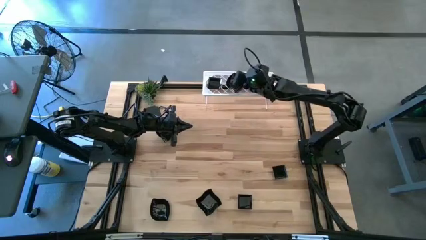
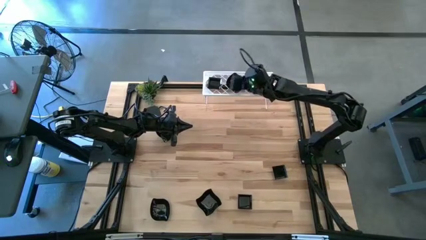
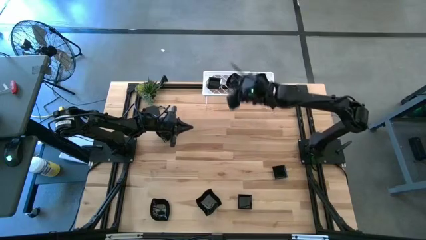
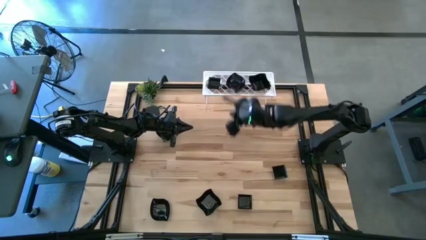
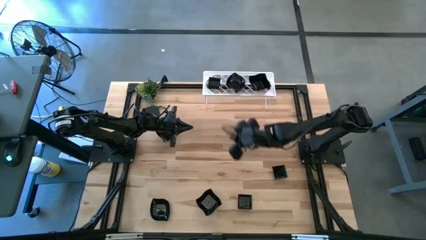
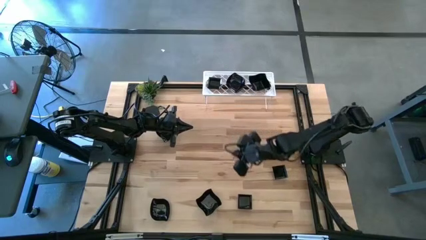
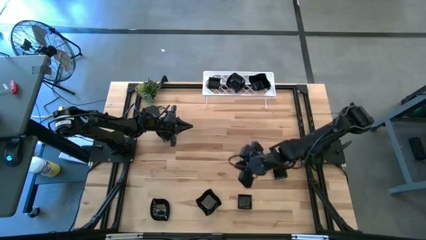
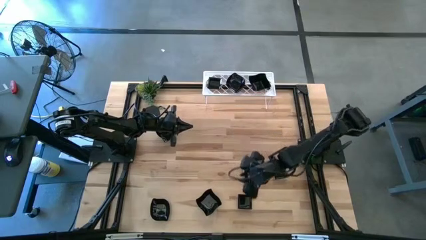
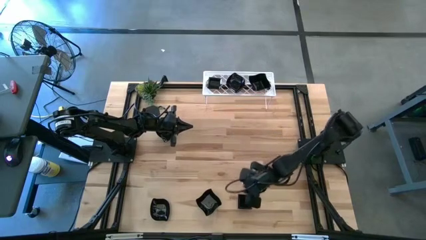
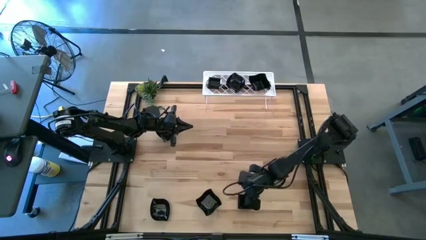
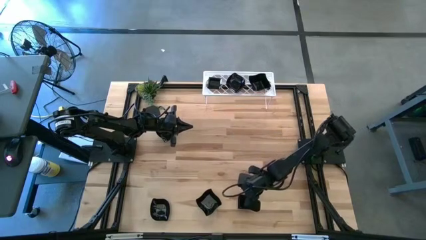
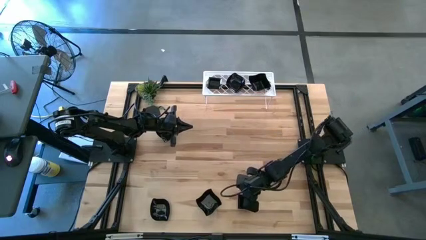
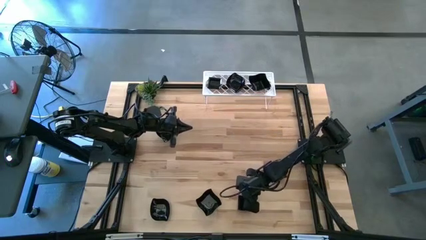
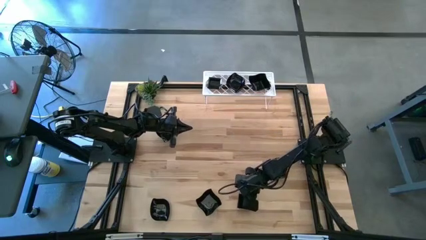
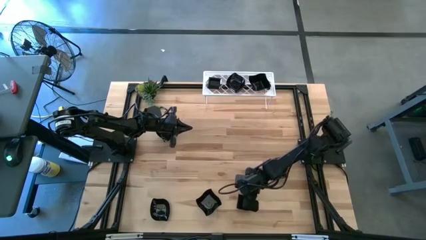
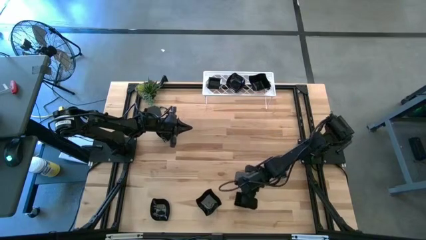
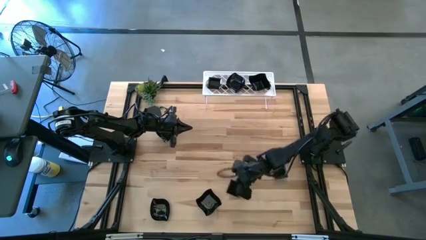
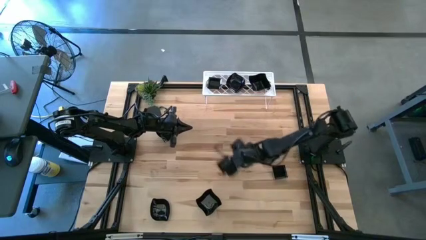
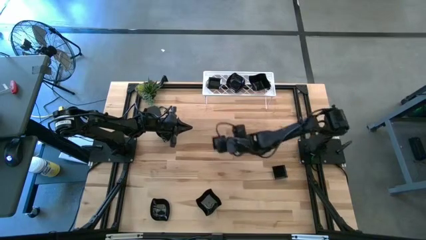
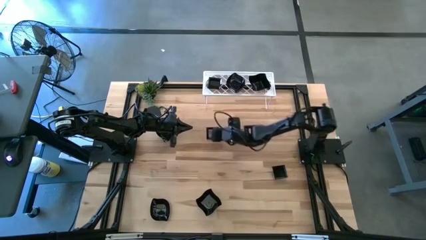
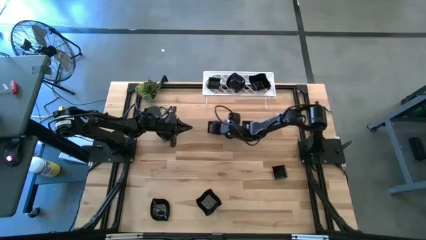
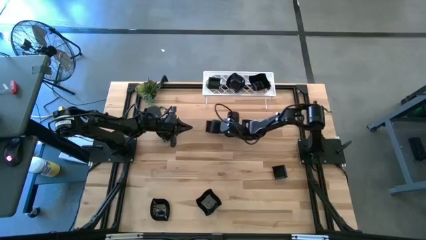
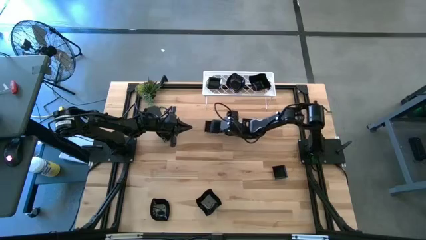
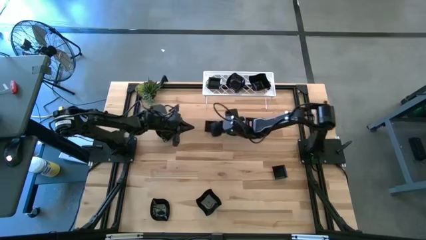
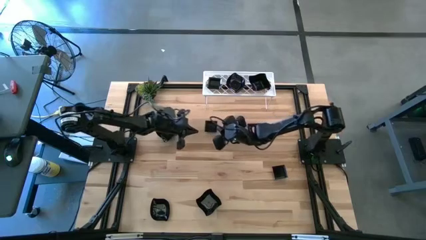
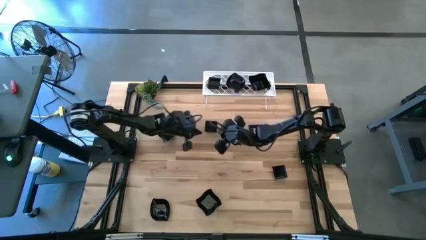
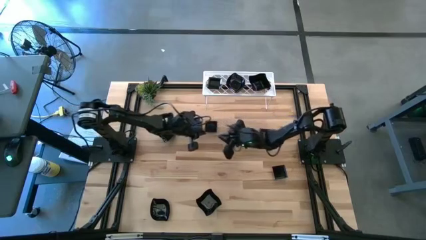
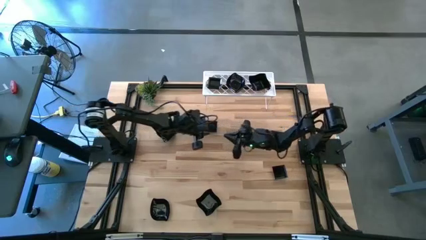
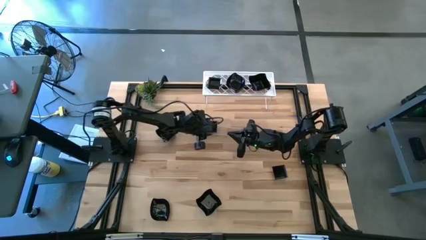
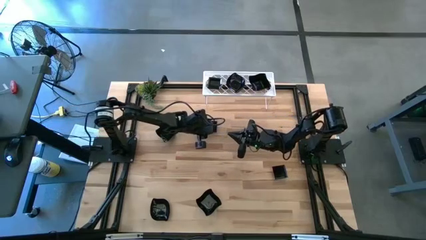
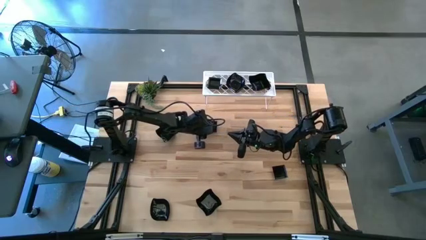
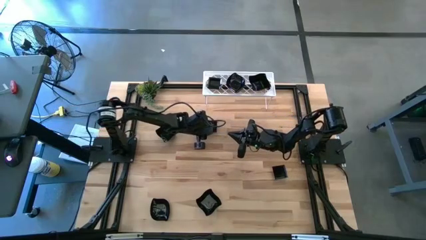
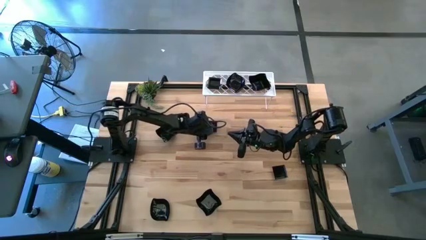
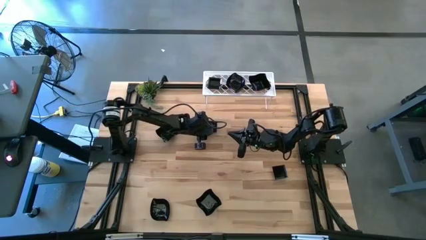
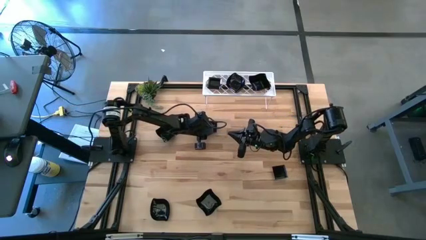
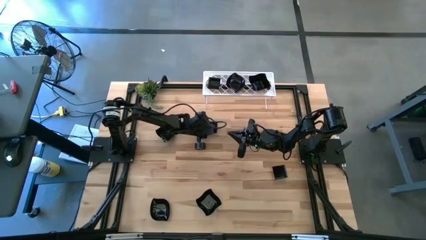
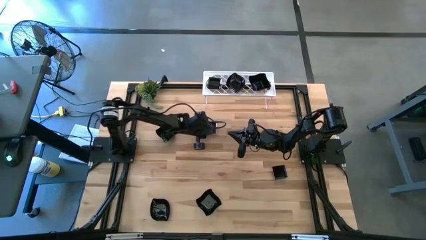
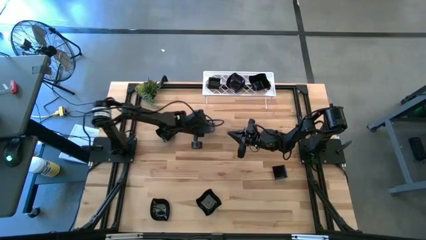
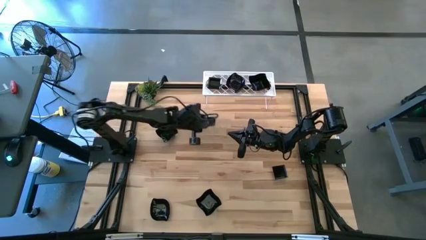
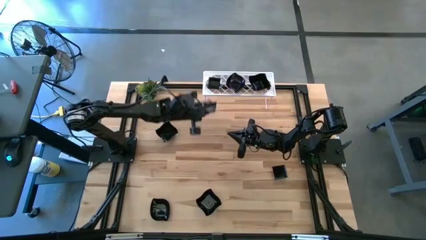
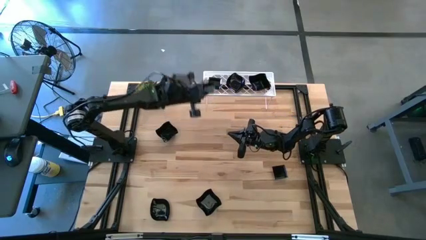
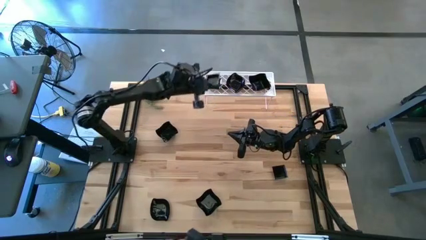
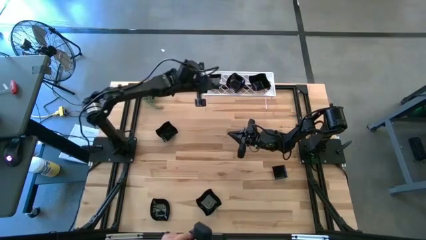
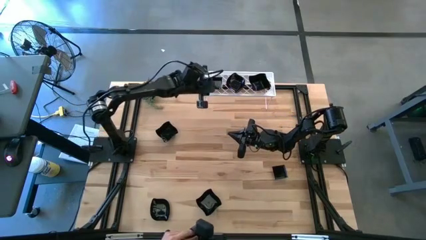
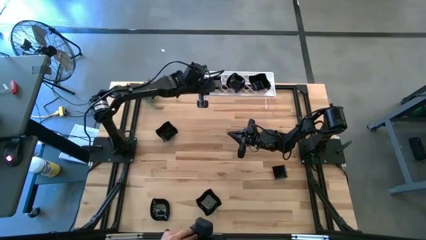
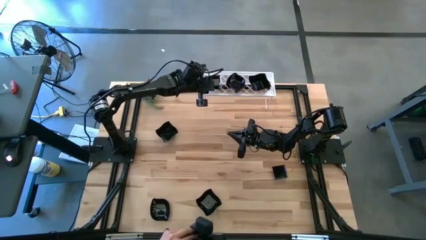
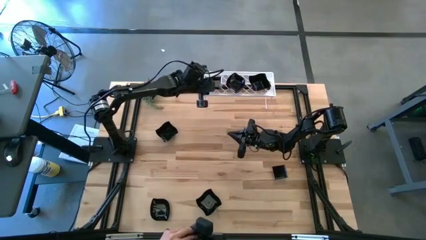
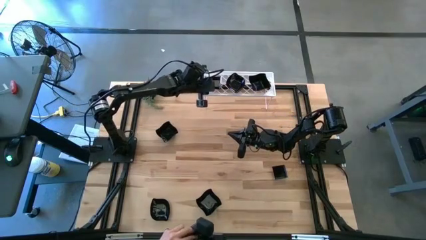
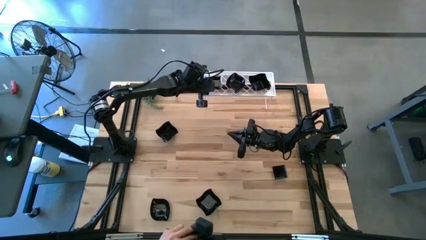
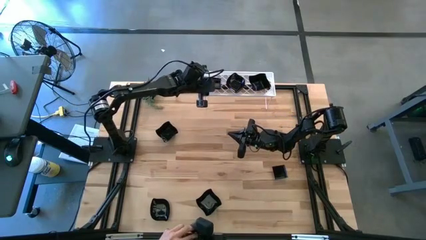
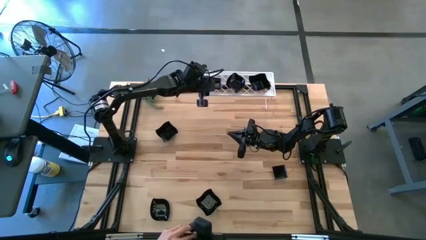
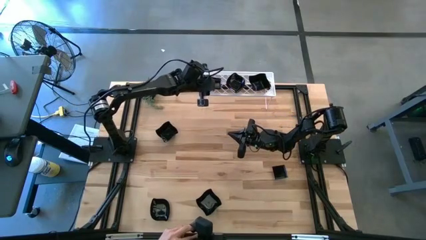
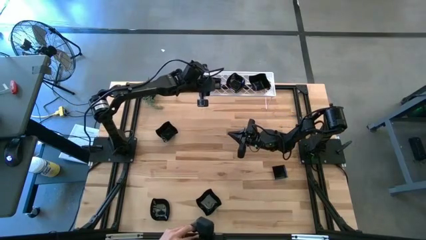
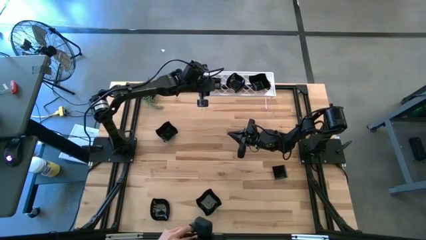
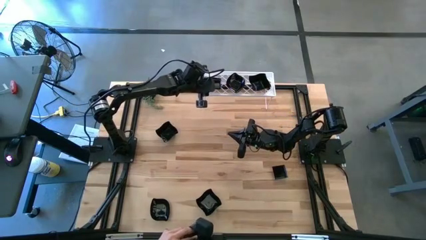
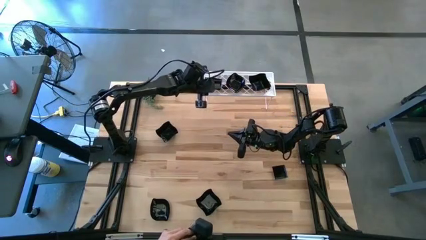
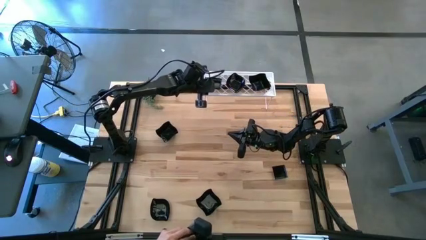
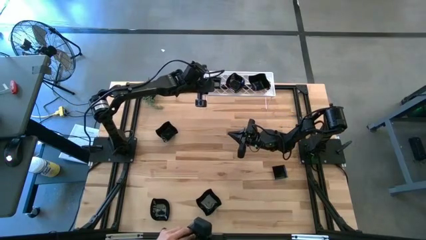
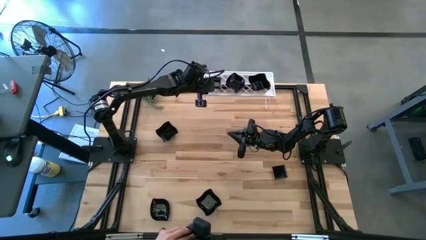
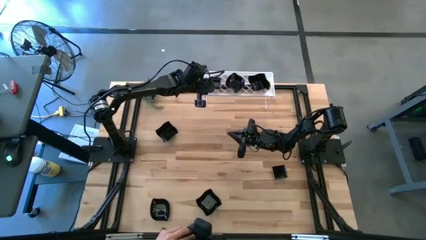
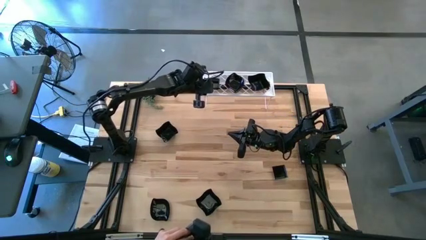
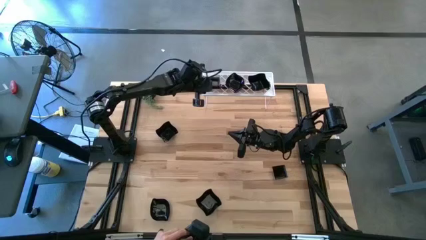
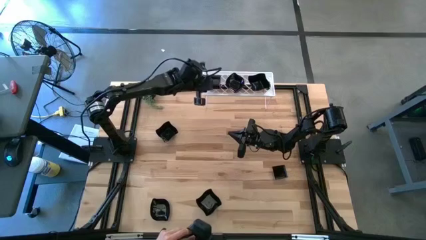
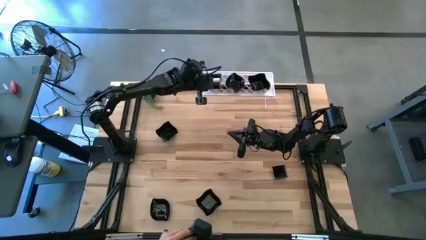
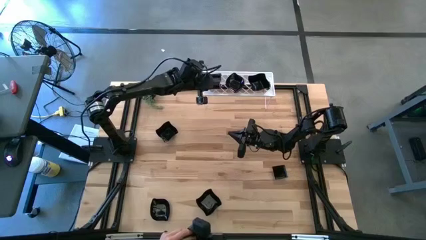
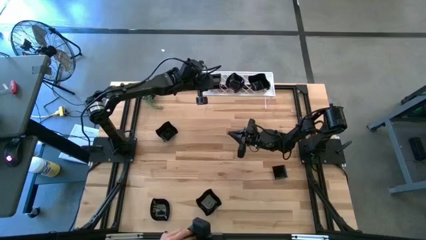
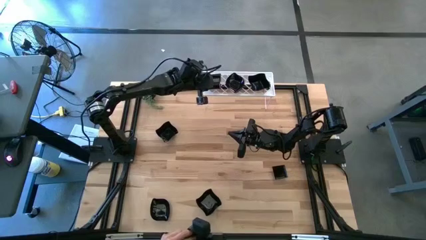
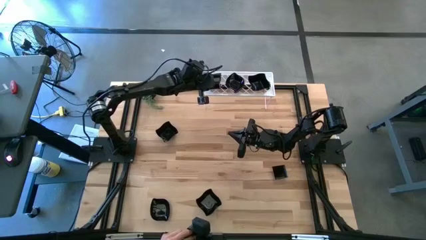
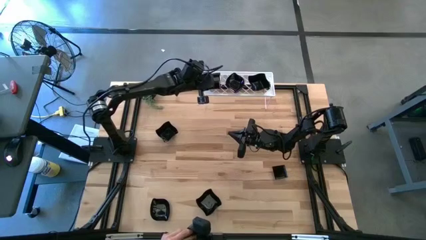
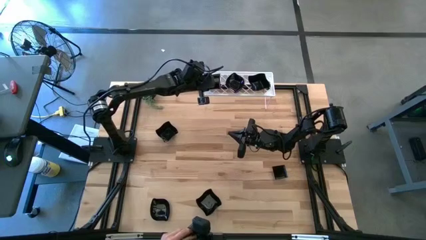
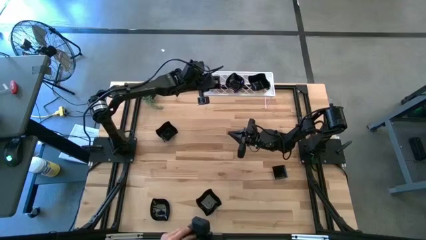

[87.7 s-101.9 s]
Task: Pick & Place Mini shaped plates
Stack the square plate on top of the stacked square plates on the shelf
